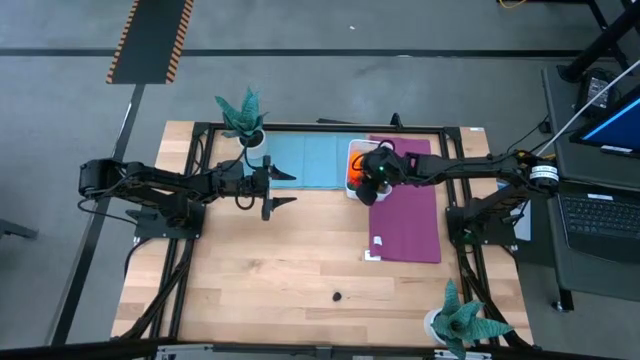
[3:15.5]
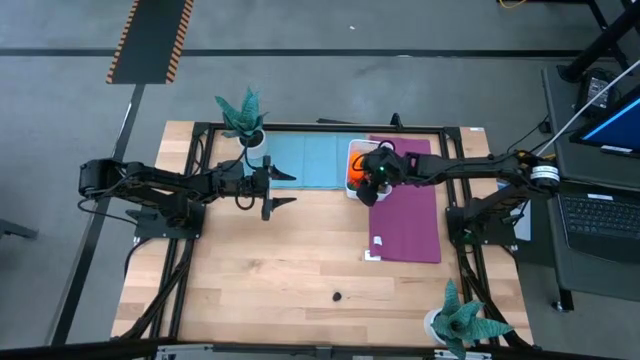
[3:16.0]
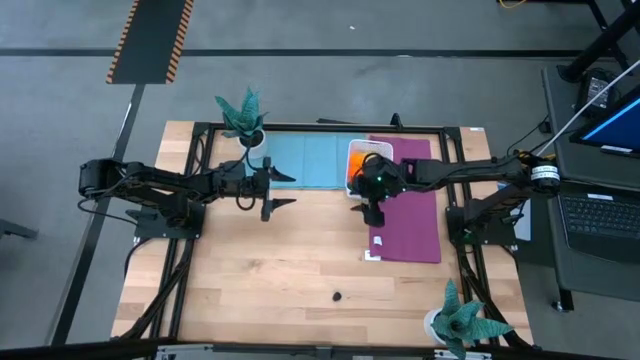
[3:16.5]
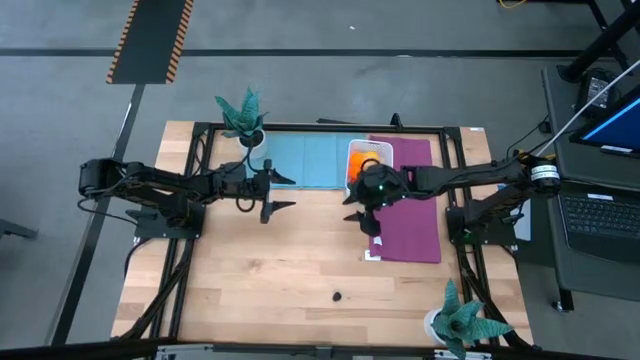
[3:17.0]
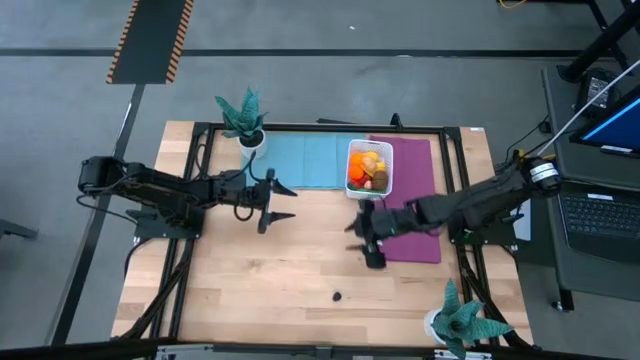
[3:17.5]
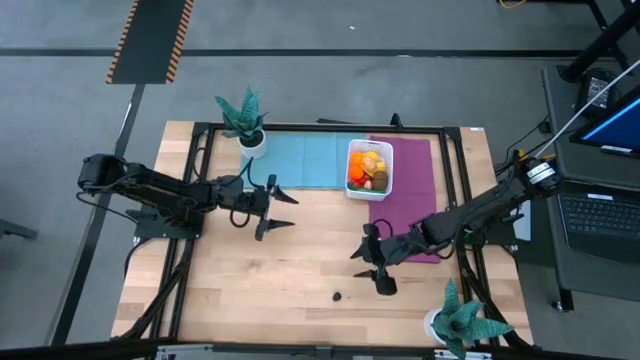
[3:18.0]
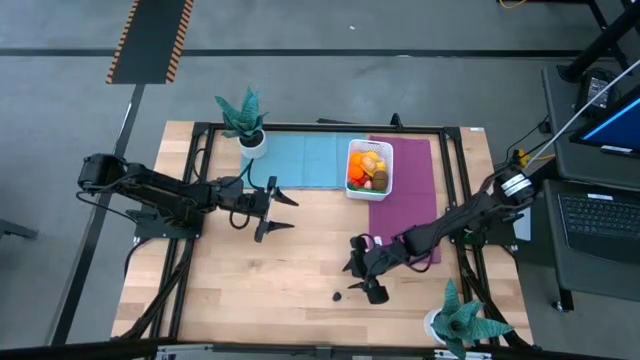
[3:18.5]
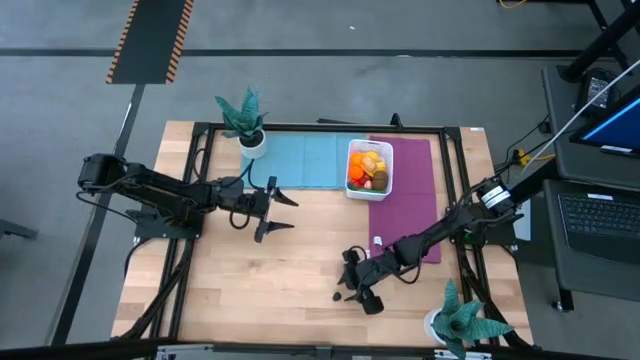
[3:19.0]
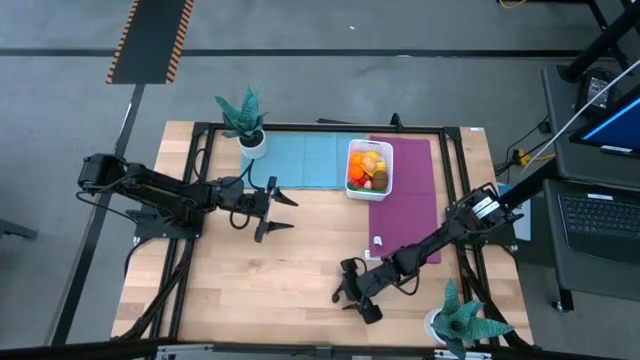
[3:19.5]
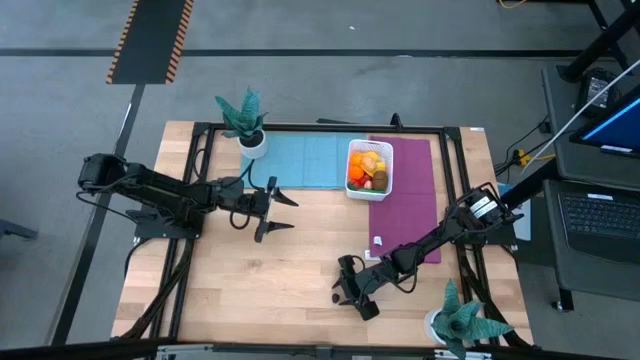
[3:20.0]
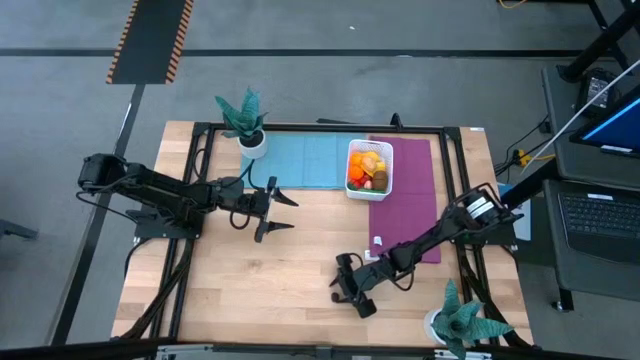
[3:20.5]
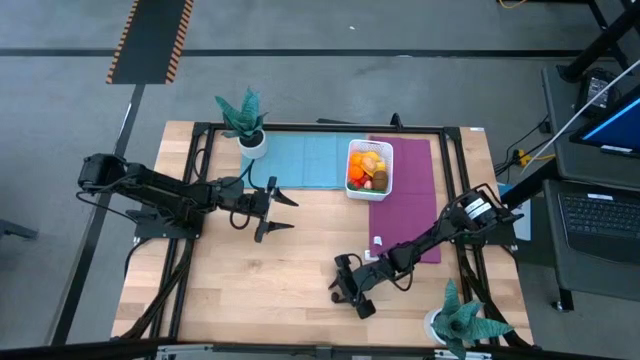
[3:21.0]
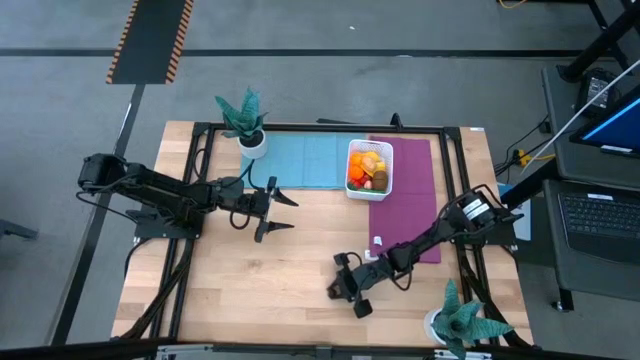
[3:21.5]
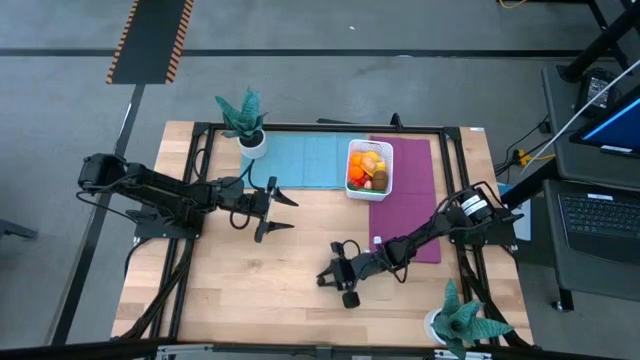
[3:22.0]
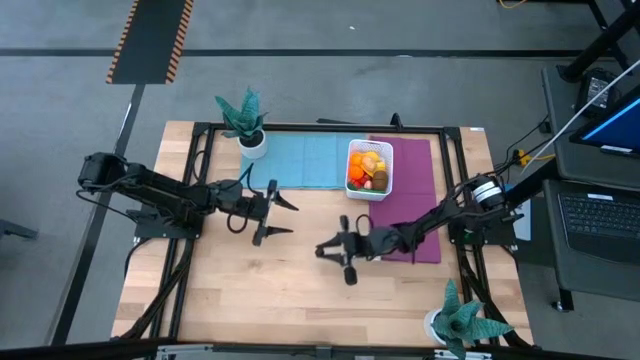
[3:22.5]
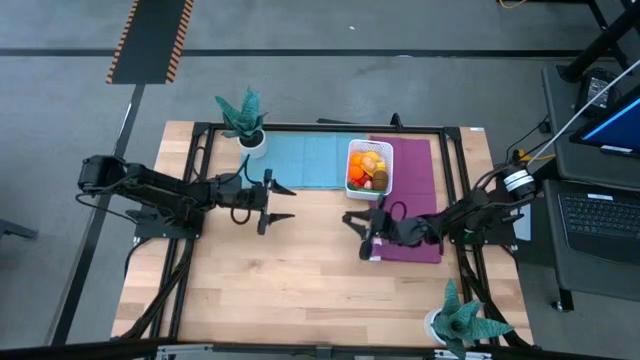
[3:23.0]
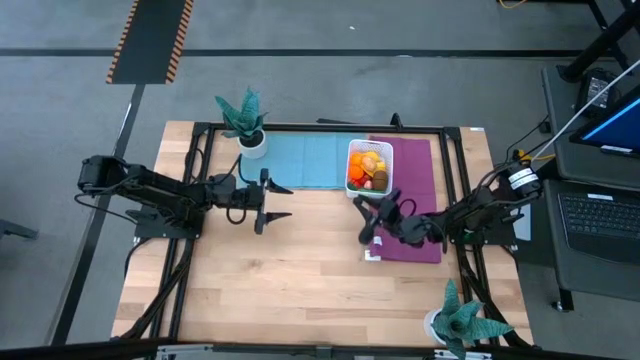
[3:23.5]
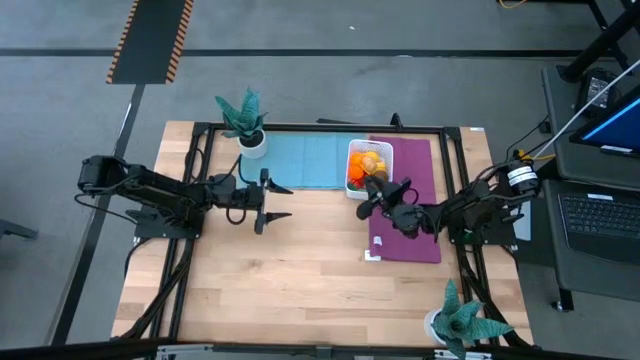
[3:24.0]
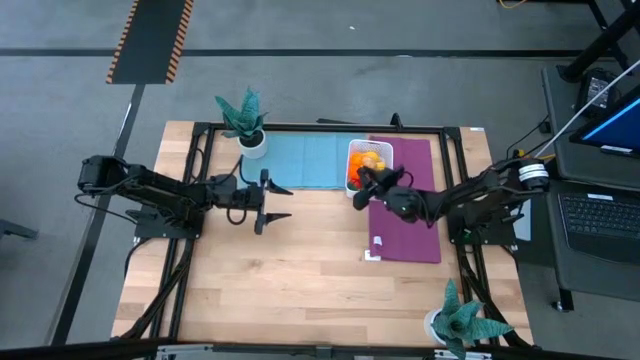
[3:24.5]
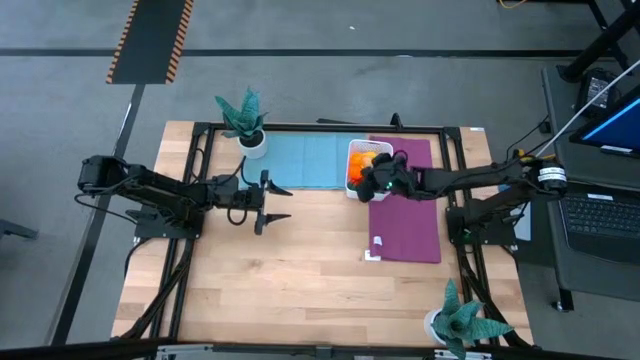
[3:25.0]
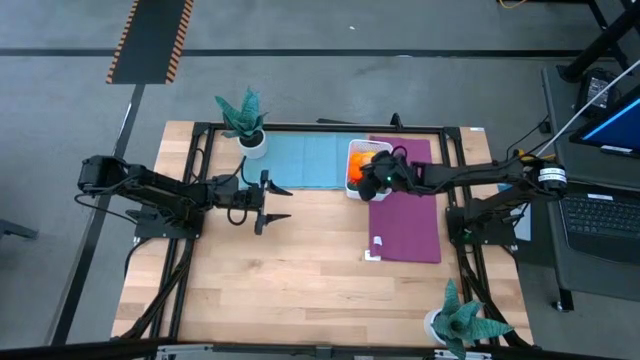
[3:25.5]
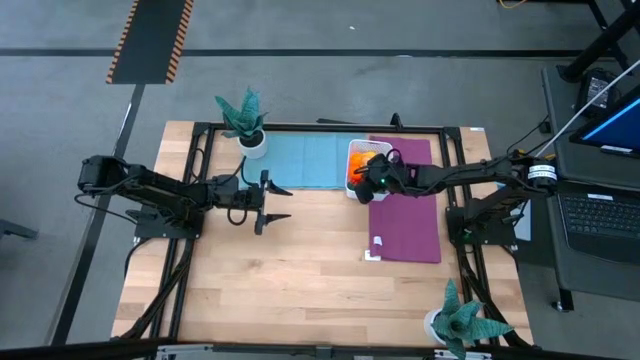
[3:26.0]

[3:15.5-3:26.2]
Task: Pick and placing Produce into tupperware
Put the black blackberry into the white container

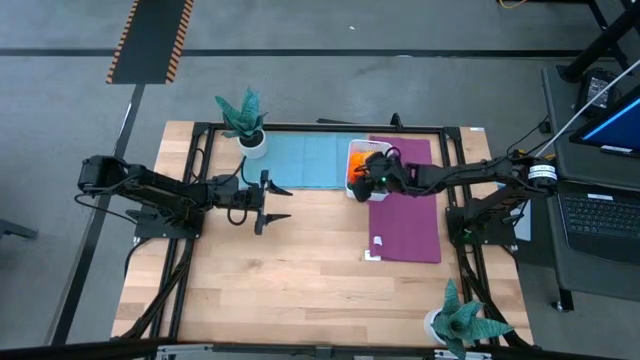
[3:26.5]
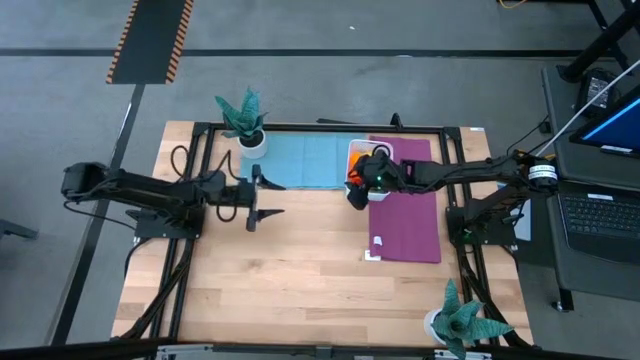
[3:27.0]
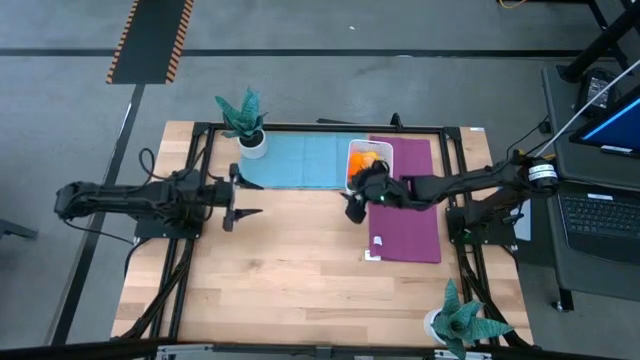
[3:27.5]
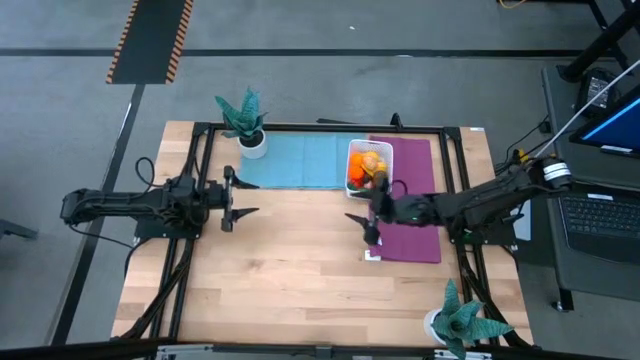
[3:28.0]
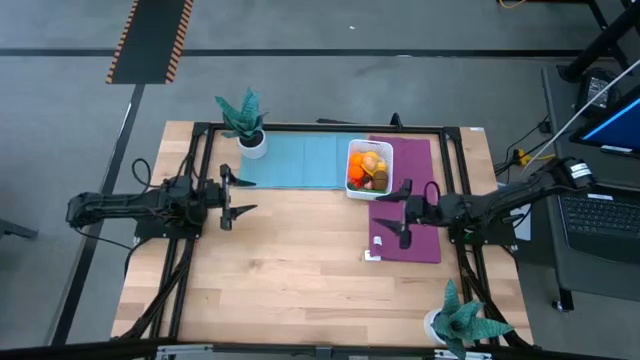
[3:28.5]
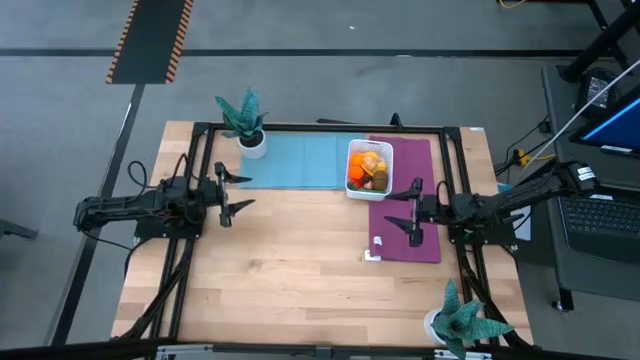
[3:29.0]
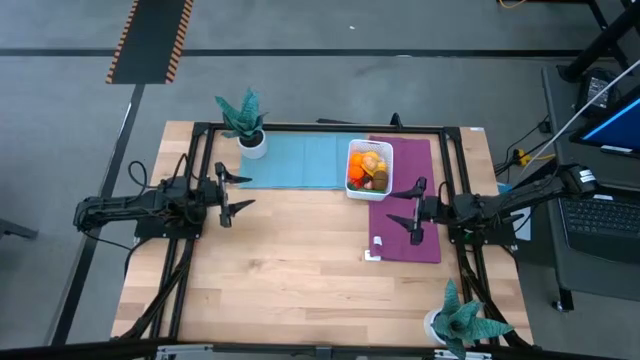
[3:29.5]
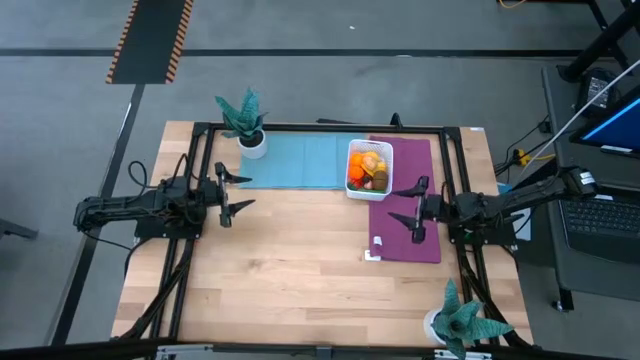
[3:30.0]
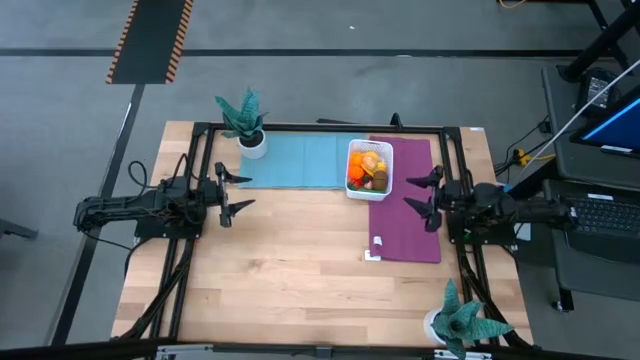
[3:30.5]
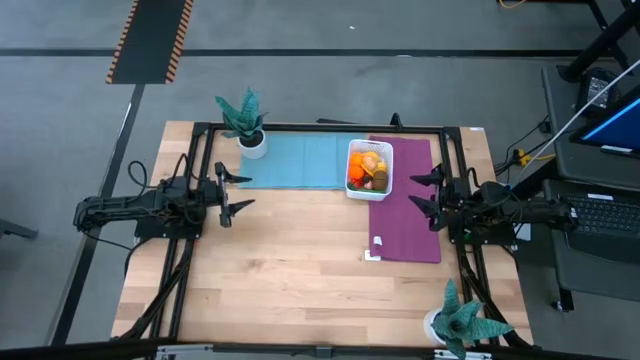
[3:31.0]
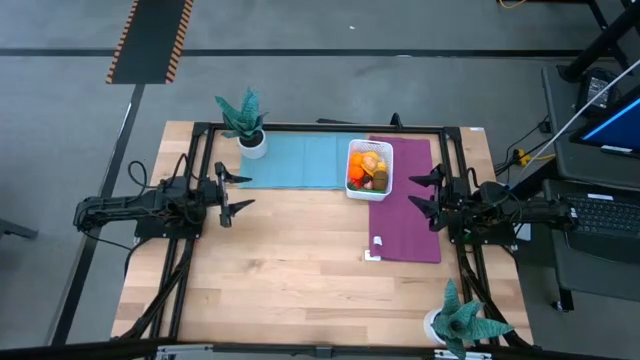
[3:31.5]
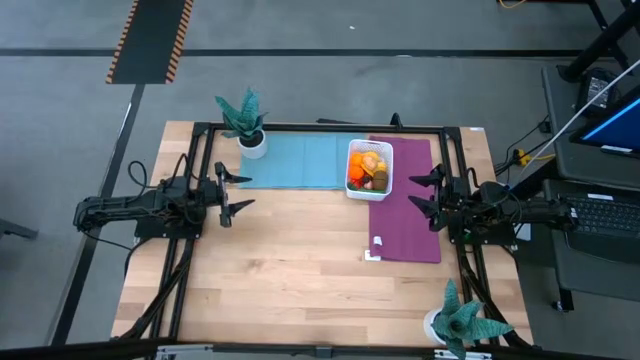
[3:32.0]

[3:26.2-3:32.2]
Return to Home Position

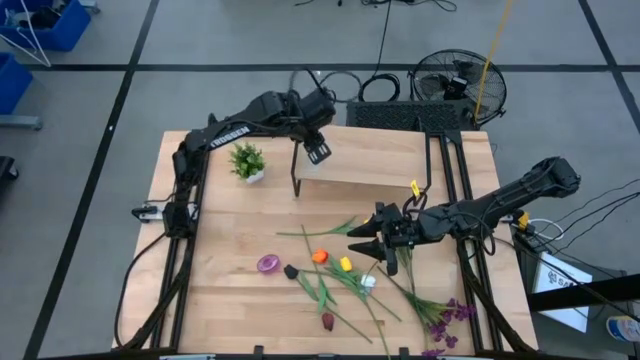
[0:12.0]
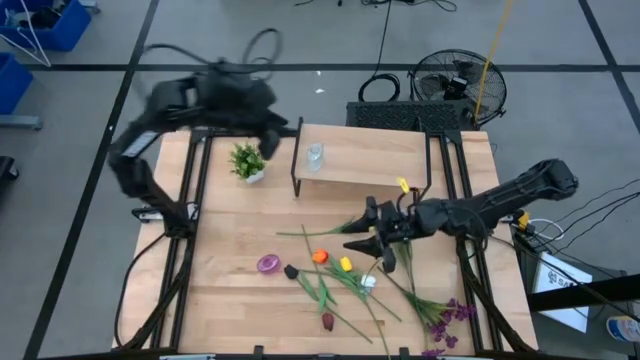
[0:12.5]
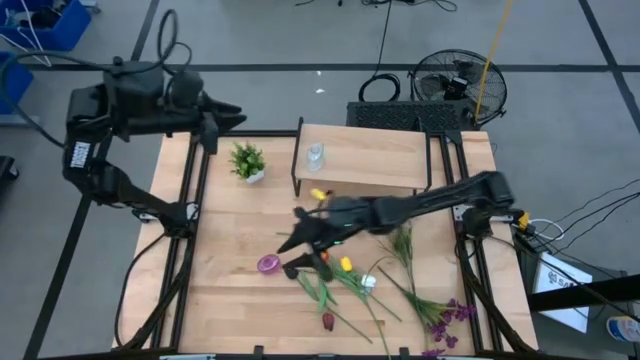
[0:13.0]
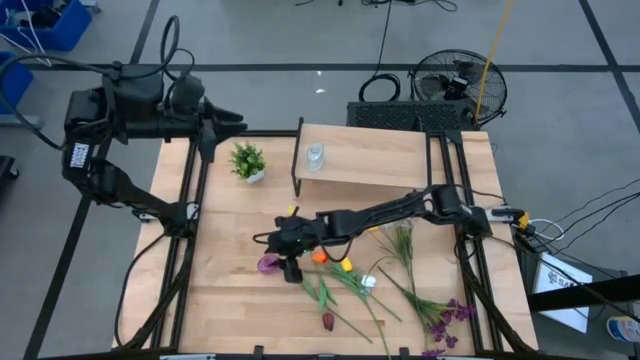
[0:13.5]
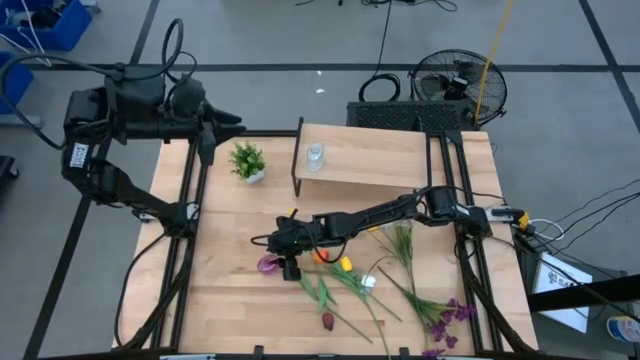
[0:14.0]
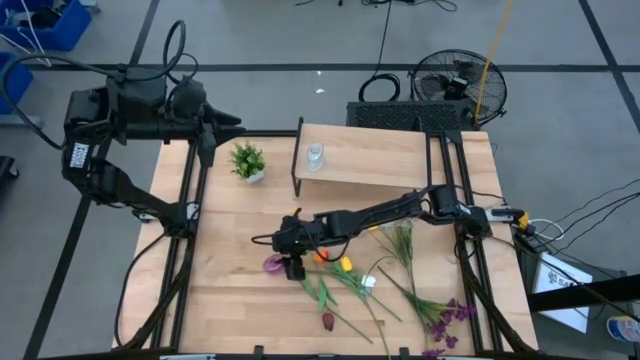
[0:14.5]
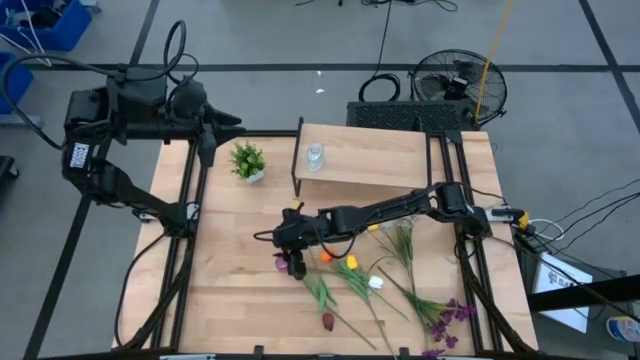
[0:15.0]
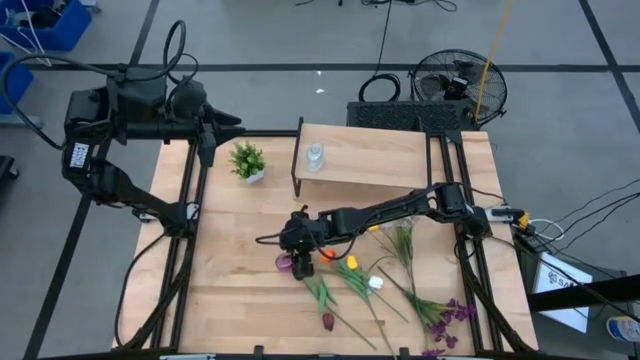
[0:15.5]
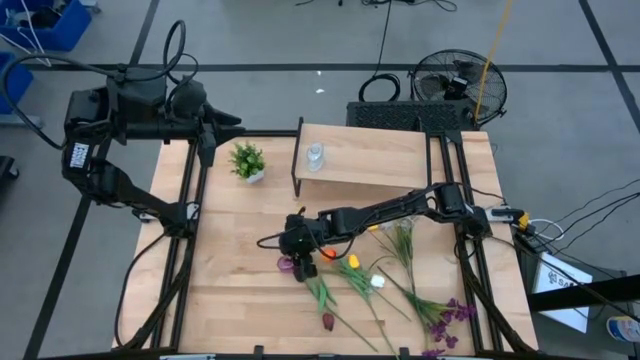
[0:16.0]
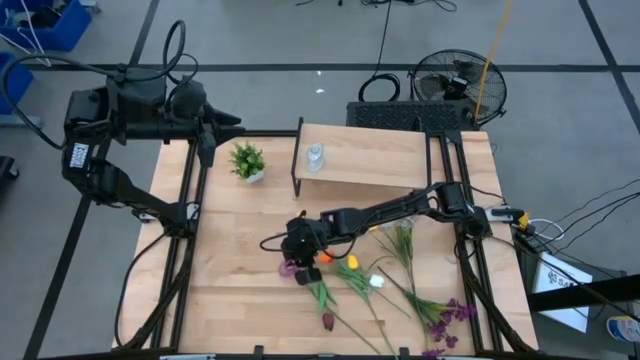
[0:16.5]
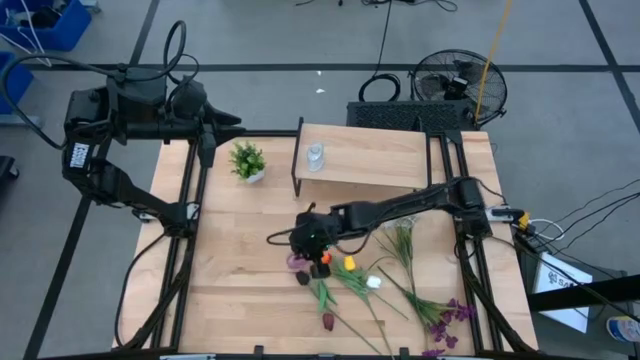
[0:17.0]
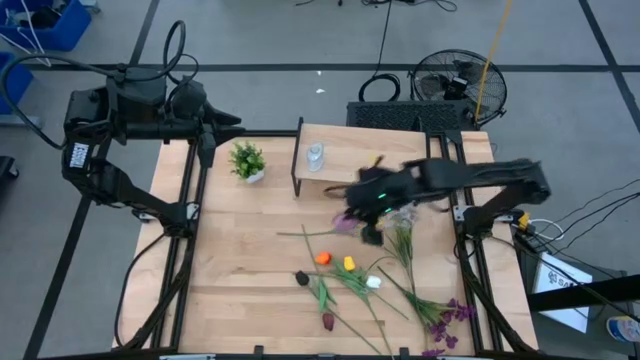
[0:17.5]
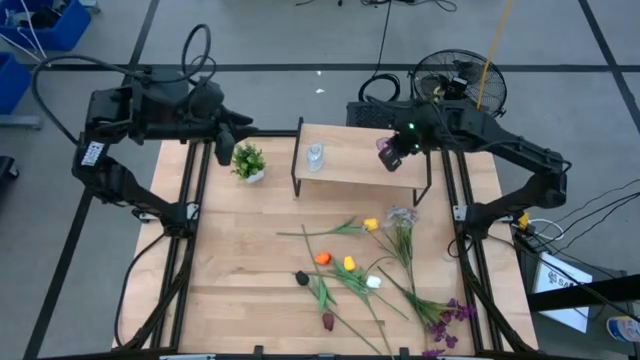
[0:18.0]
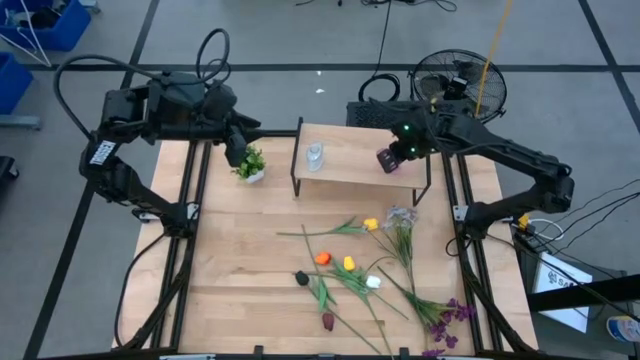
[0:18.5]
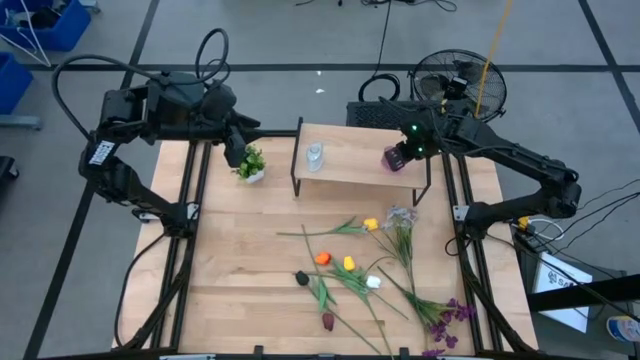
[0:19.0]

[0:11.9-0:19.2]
Task: Pick and place flowers into a vace then onto a shelf
Put the purple vase on the shelf
